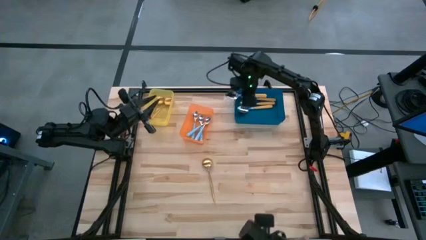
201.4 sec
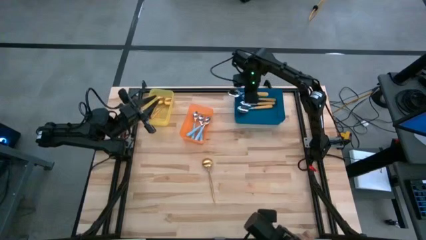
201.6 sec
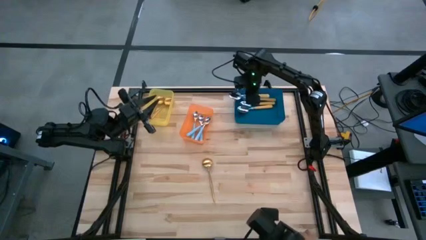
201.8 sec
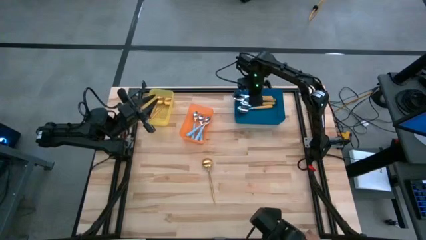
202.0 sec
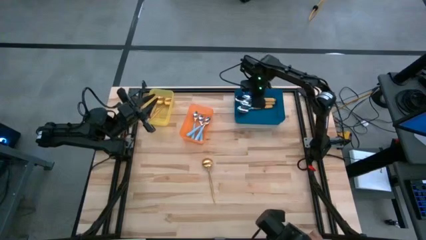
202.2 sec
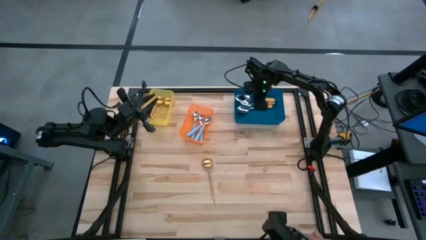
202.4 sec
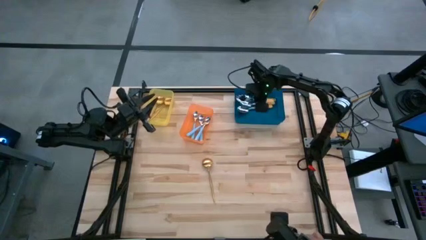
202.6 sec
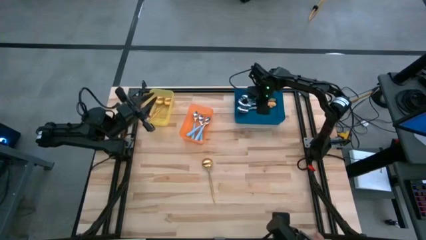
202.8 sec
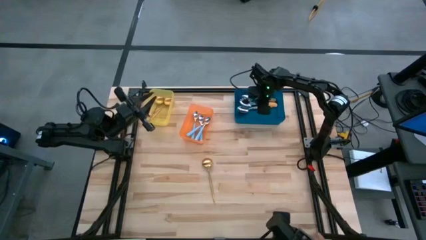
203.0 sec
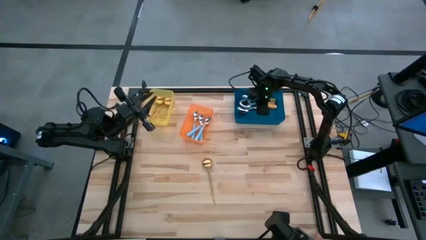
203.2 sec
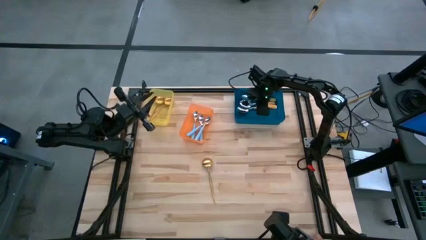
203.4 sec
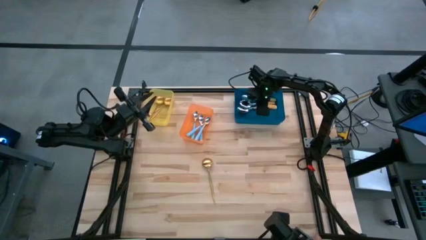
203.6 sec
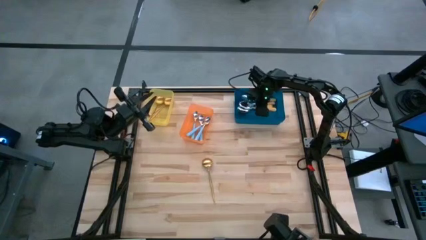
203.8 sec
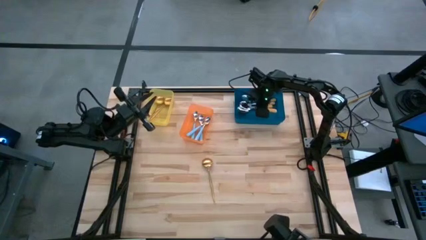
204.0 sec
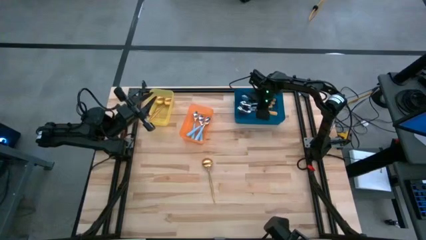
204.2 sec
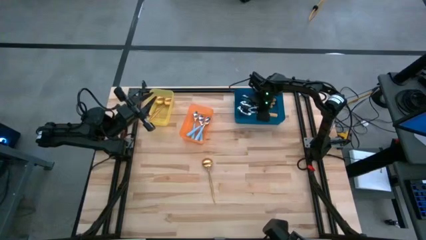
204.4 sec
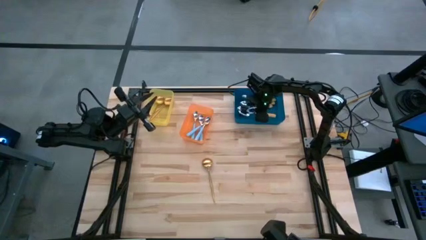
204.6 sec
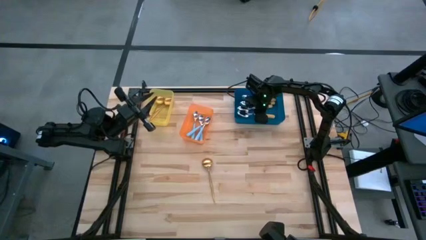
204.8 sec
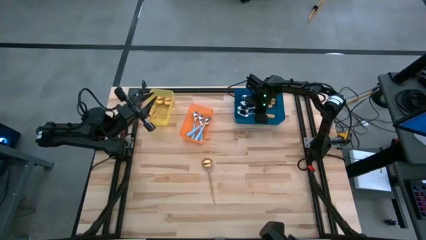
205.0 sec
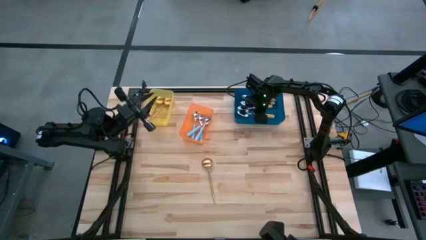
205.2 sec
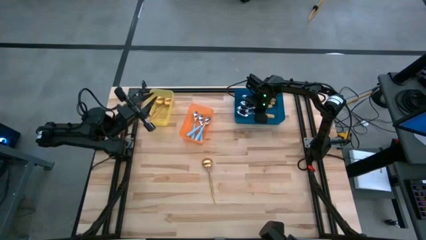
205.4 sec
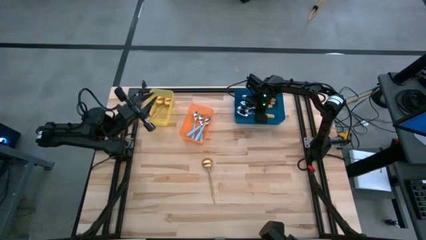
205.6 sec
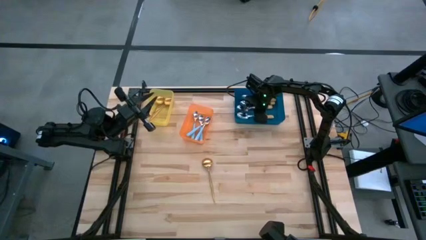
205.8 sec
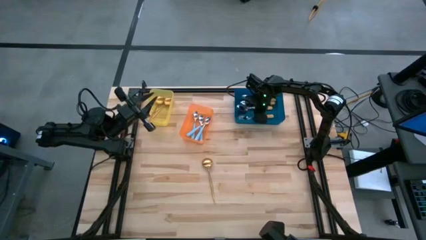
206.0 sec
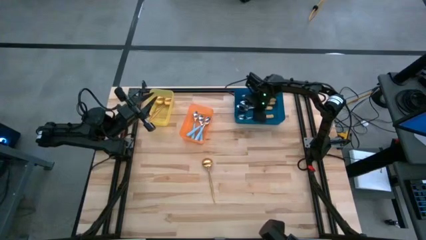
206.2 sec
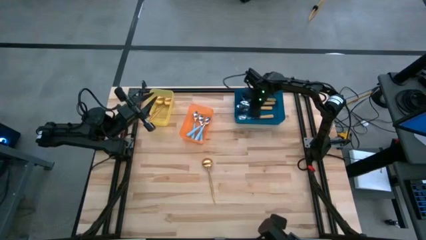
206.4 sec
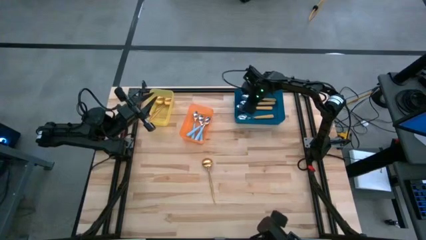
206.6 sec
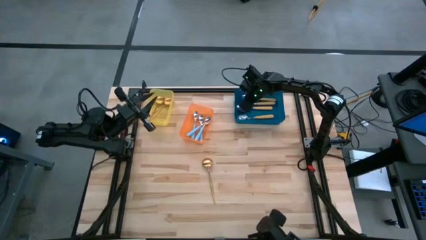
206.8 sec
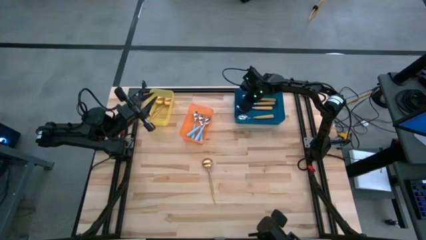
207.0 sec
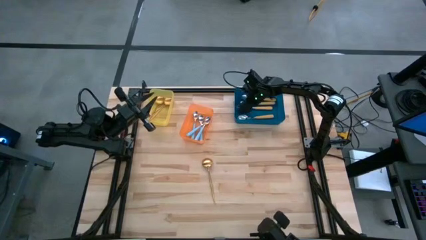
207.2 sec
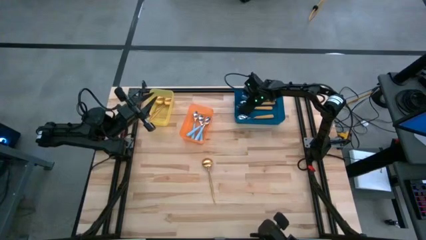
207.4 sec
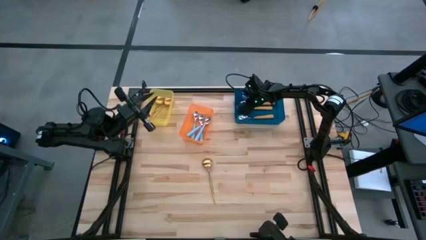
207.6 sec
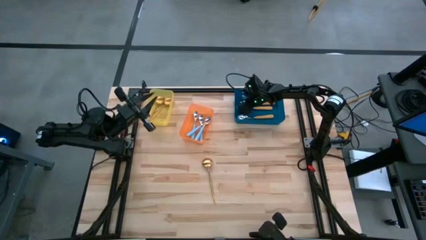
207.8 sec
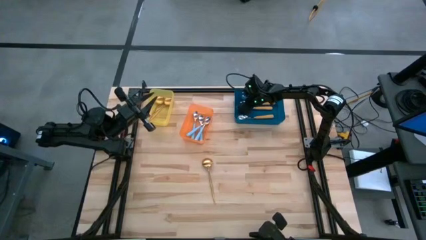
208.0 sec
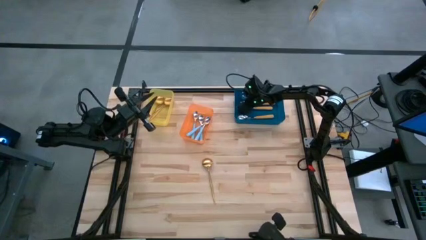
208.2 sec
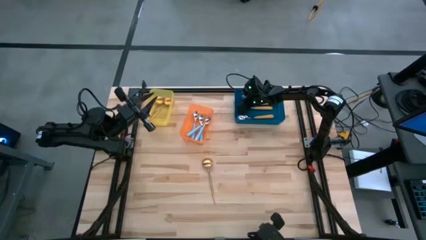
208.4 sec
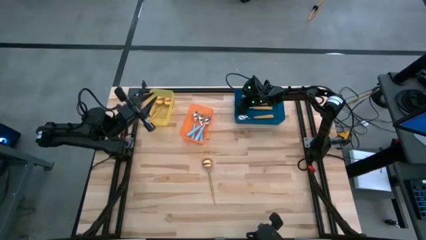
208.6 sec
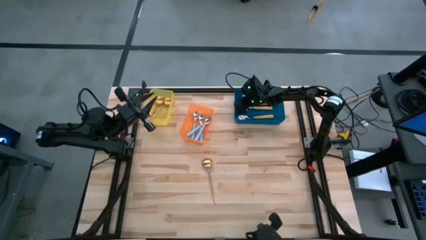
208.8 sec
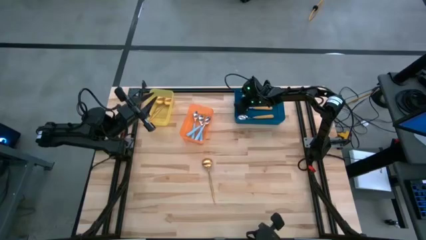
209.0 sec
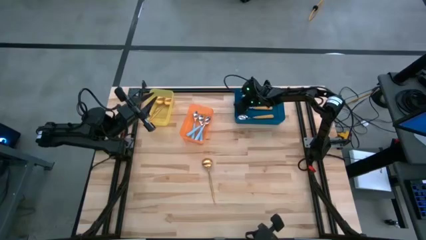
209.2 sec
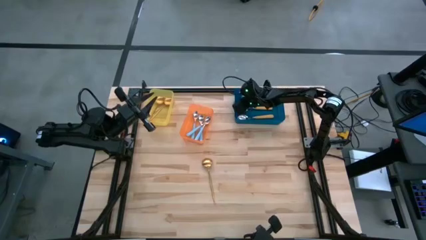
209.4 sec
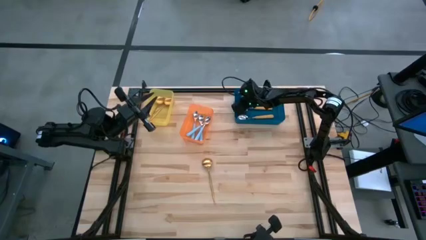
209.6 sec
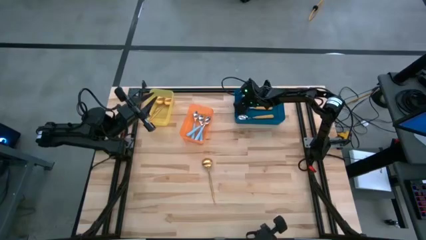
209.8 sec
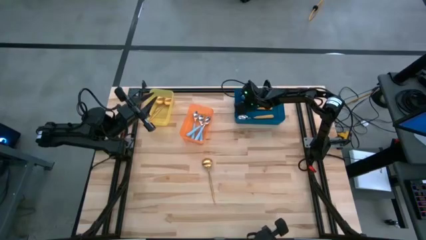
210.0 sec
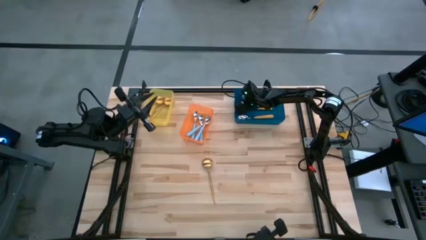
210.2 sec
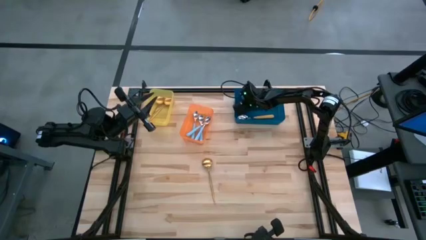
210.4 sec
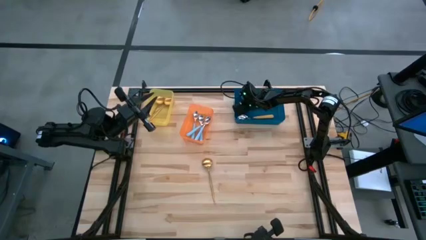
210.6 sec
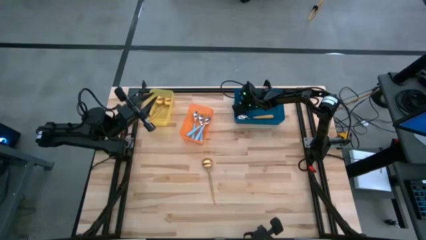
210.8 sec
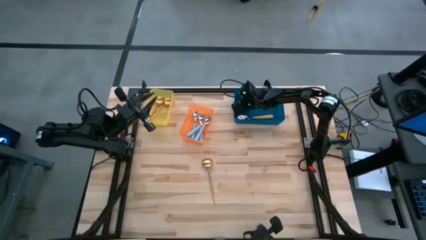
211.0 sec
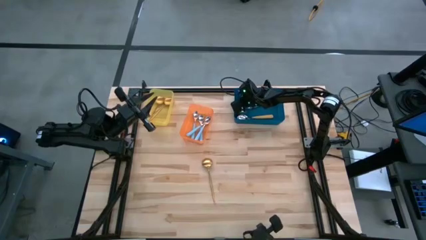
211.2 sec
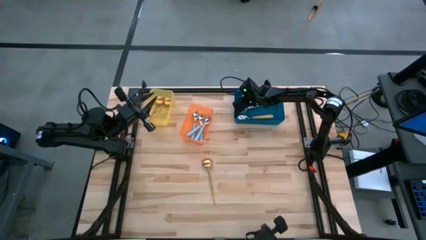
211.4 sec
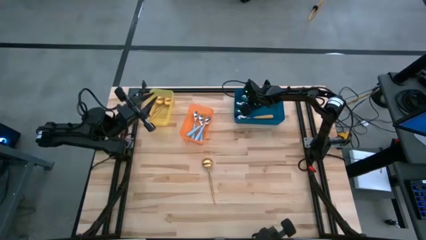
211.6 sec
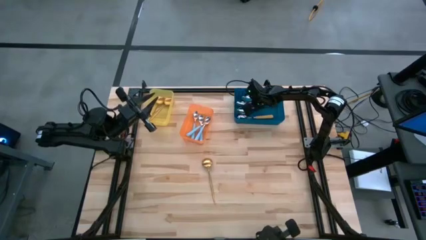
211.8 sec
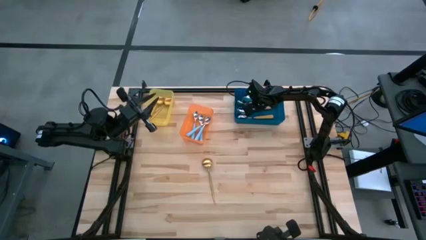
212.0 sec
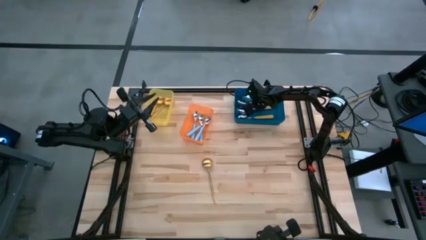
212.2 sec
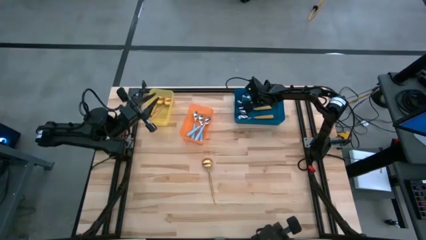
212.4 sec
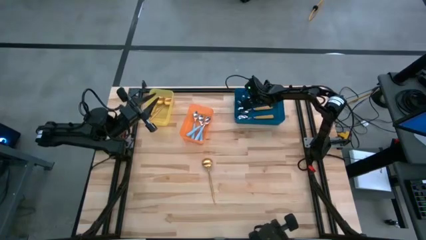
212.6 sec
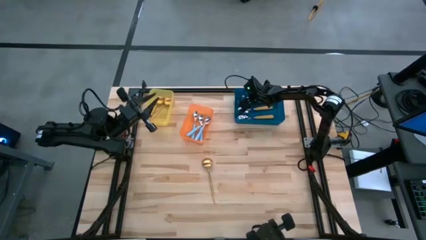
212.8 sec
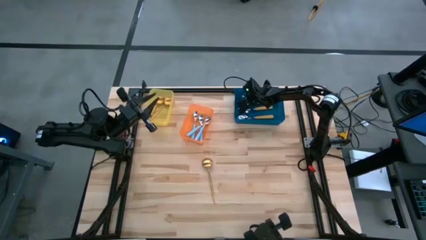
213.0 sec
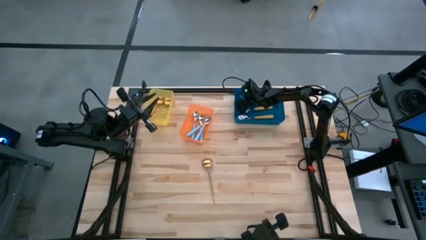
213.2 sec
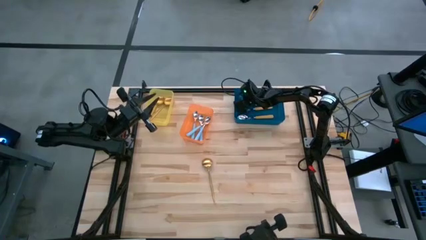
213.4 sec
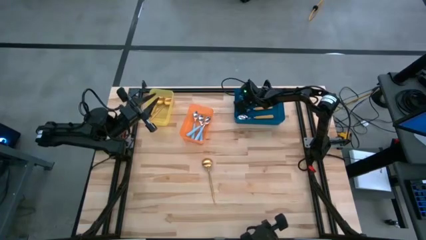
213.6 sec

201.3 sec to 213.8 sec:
Task: Sort silverware by color (type)
Put the yellow spoon into the blue bin
